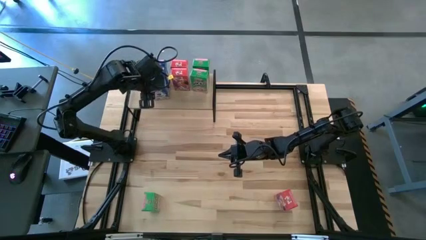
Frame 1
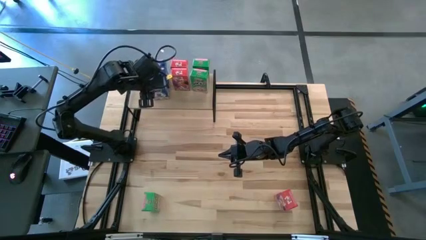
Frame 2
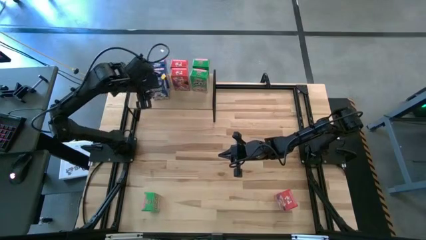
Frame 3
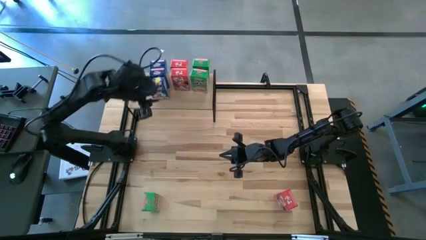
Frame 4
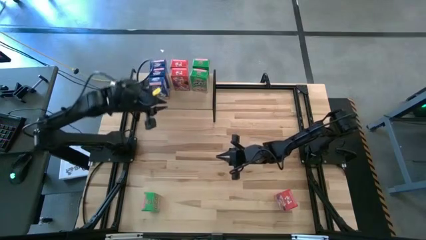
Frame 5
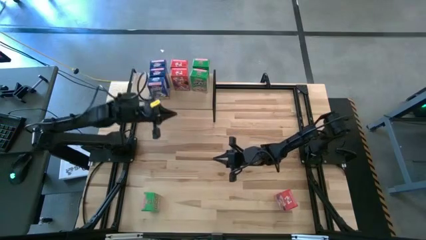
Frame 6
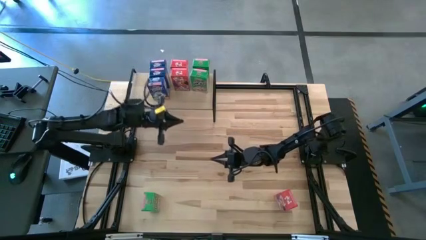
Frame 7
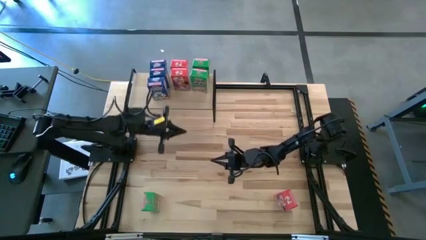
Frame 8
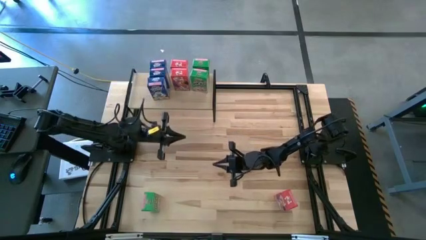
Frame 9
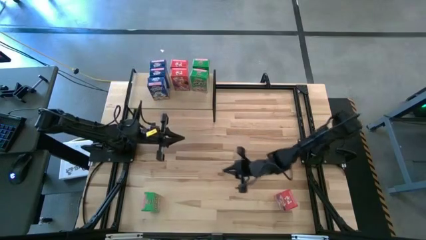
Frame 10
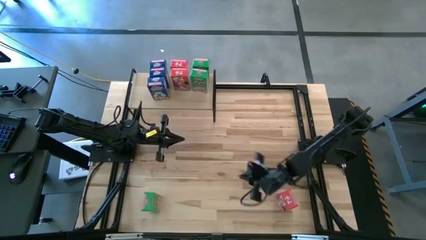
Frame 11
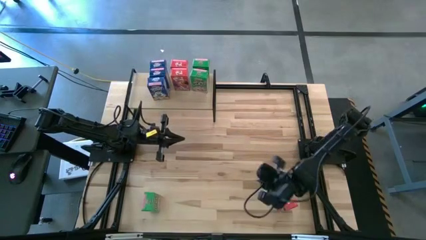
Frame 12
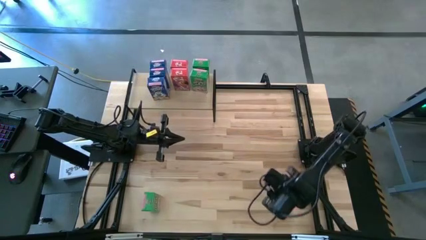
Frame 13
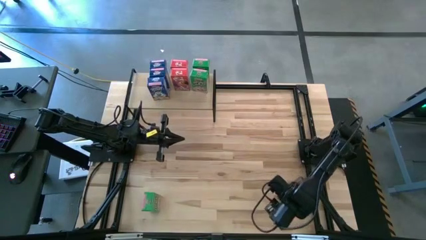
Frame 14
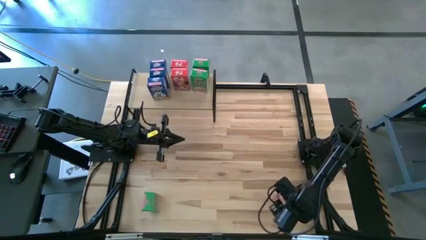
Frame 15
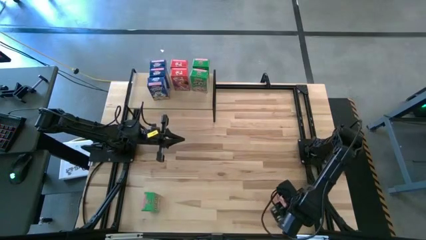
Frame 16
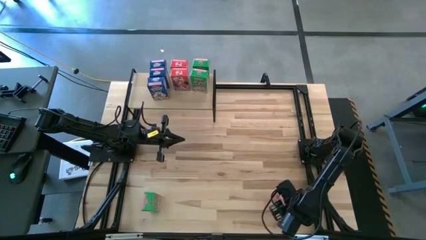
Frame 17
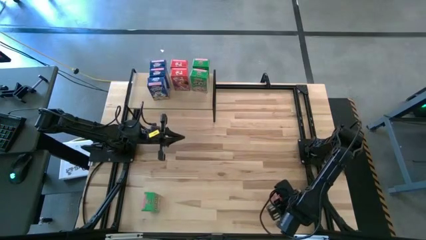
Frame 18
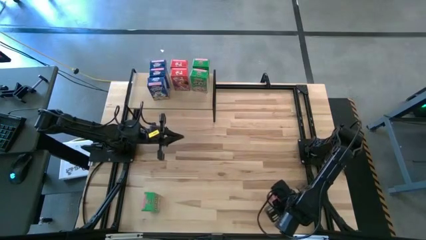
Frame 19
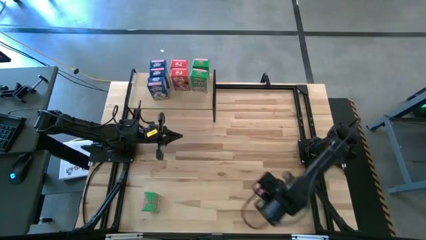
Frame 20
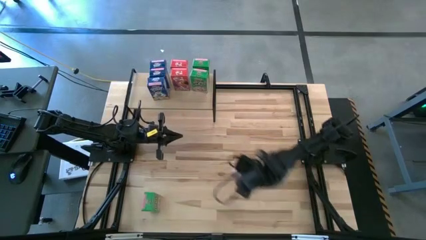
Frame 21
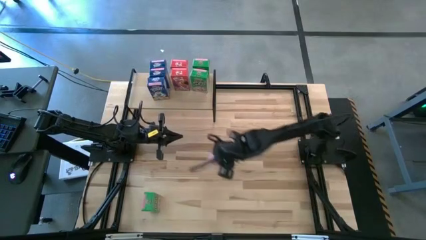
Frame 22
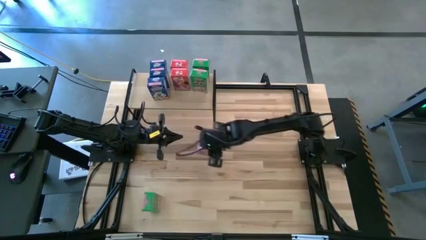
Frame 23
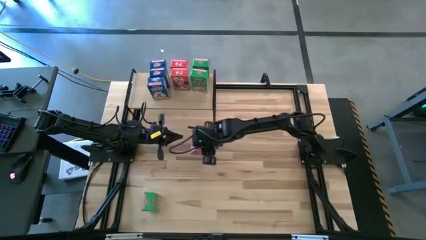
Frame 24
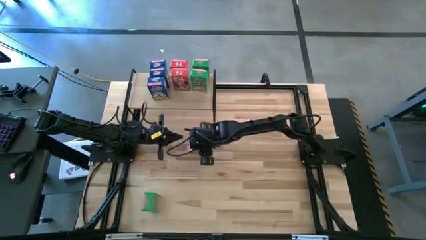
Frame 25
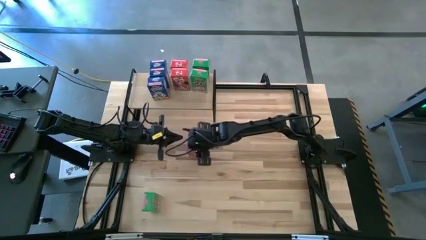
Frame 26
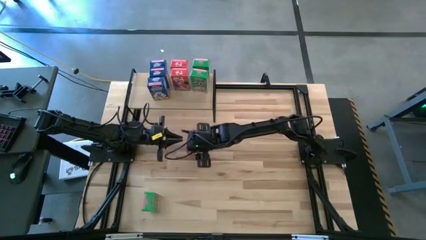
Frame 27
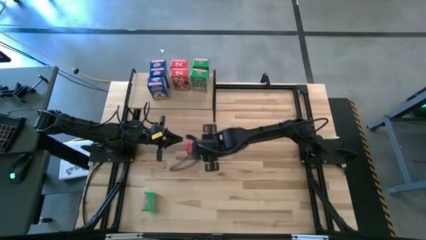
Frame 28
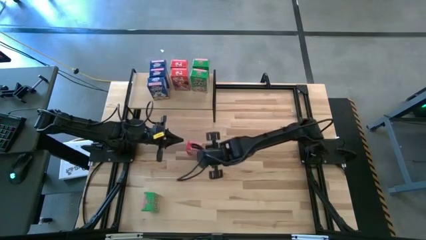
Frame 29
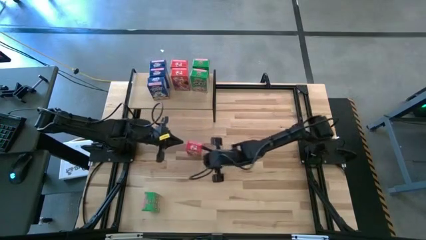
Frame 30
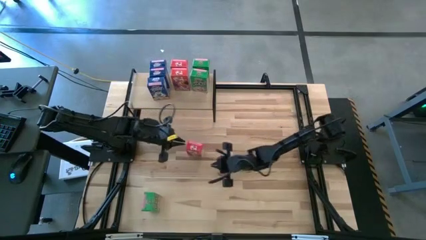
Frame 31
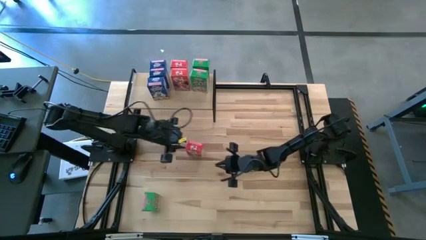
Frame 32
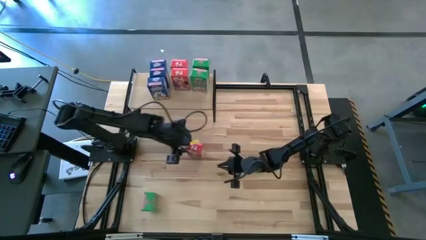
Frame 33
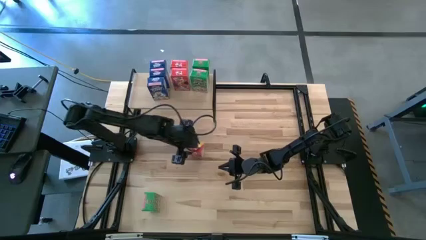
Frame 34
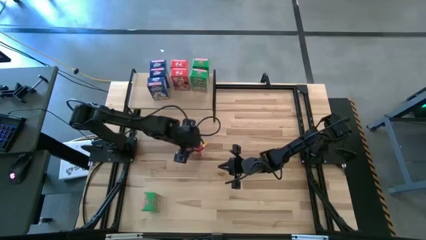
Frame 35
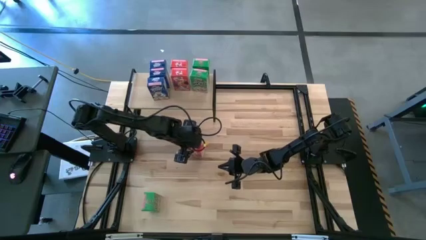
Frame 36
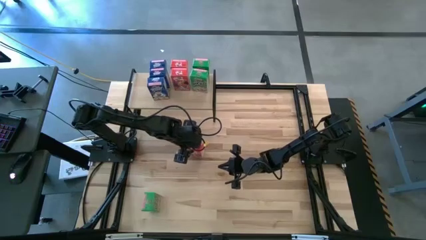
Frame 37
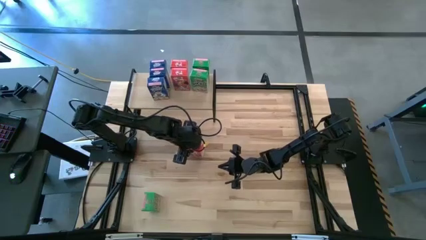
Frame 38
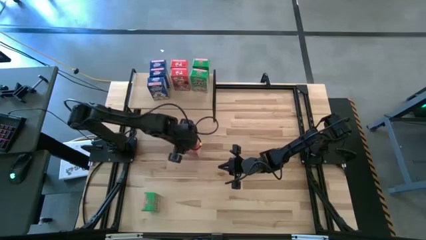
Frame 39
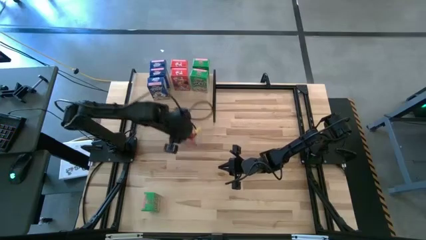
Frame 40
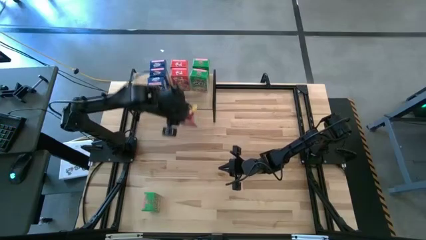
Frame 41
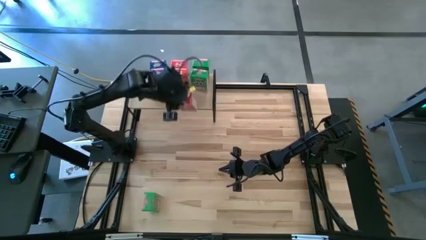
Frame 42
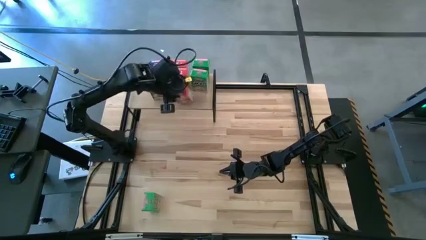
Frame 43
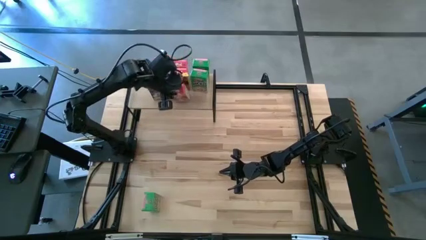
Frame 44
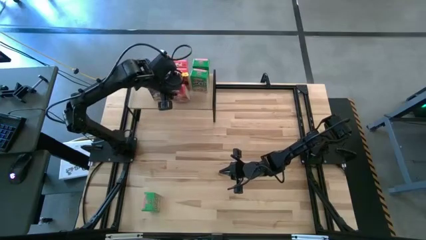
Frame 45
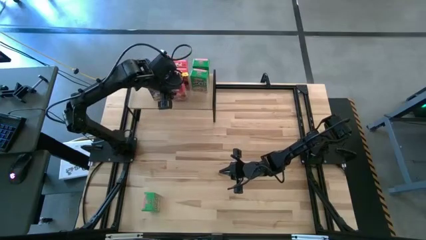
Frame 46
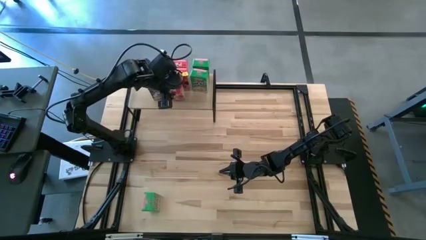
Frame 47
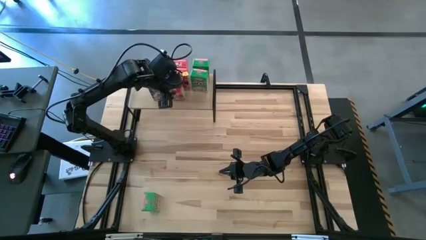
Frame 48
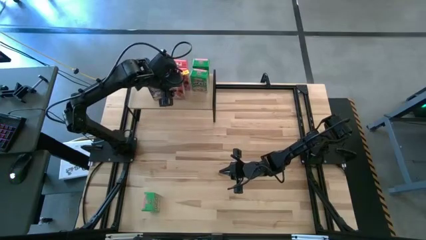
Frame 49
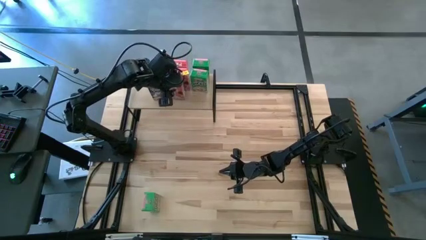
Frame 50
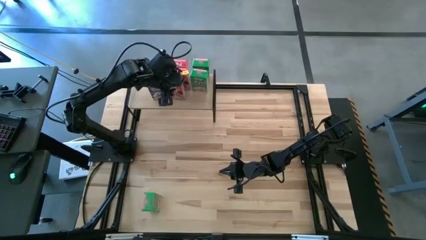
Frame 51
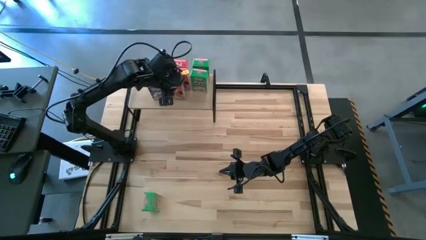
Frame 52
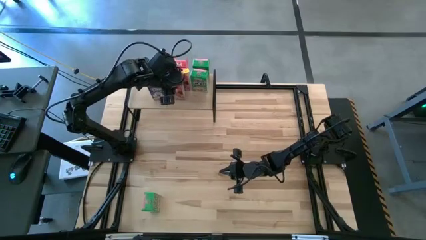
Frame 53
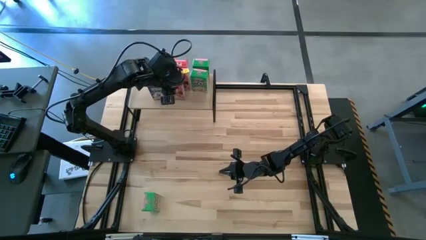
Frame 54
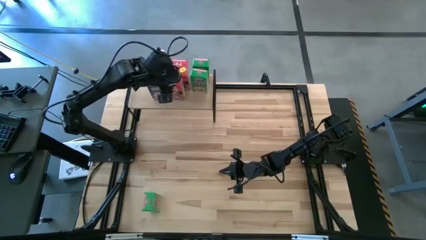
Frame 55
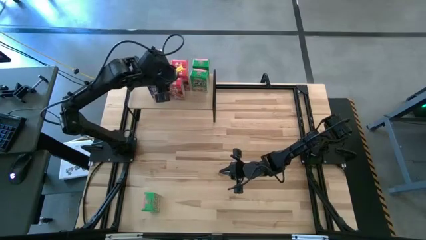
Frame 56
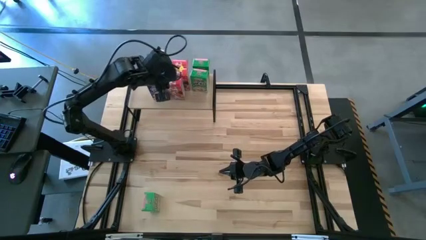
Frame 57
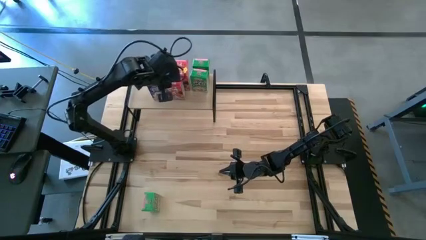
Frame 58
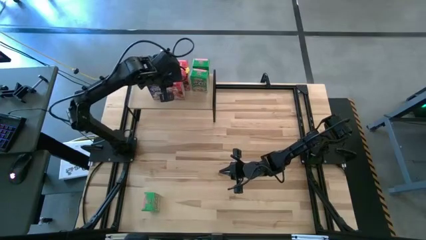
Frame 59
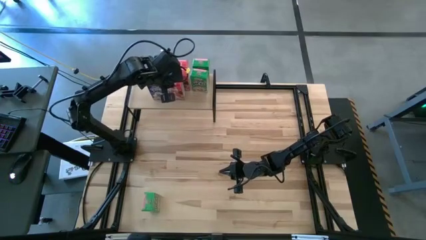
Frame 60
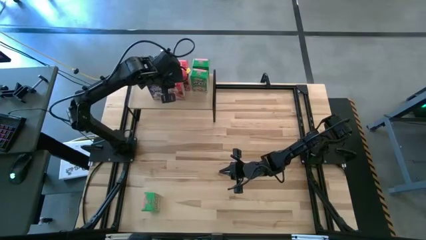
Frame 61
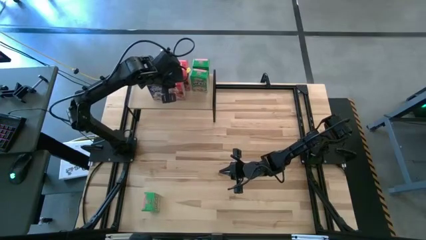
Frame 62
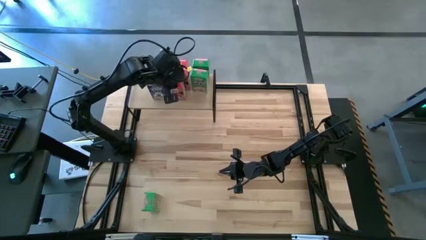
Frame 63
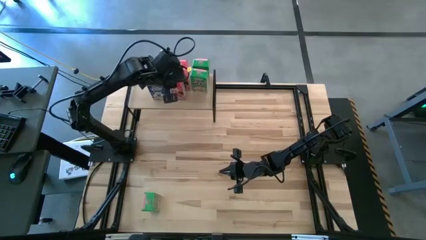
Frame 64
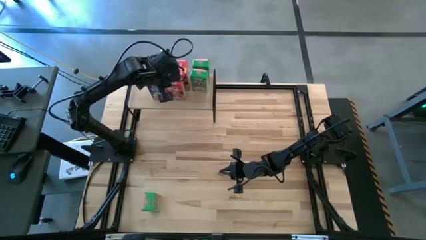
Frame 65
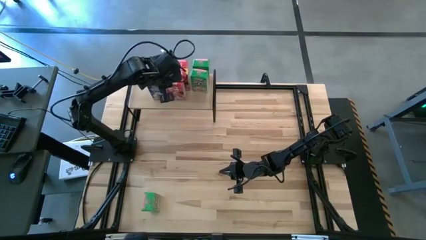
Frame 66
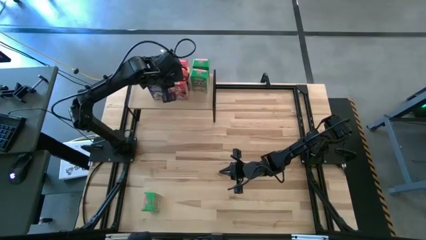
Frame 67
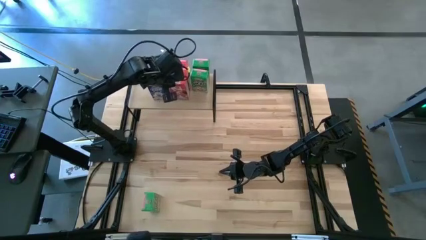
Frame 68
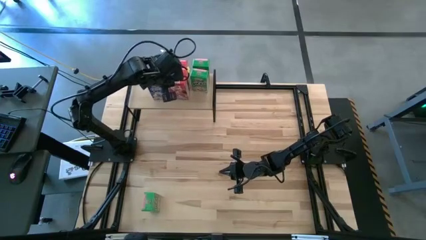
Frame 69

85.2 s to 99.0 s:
Task: Stack cereal on shelf
Put the red cereal box on the shelf aligned with the other red cereal boxes
